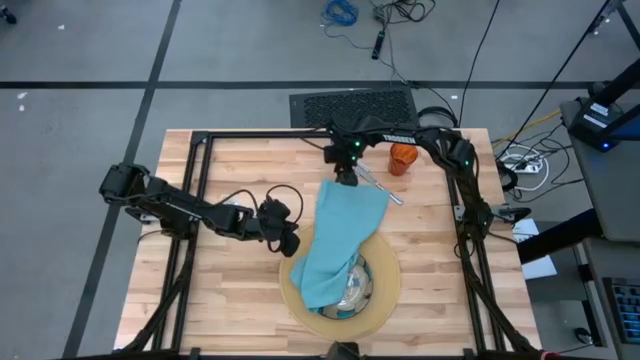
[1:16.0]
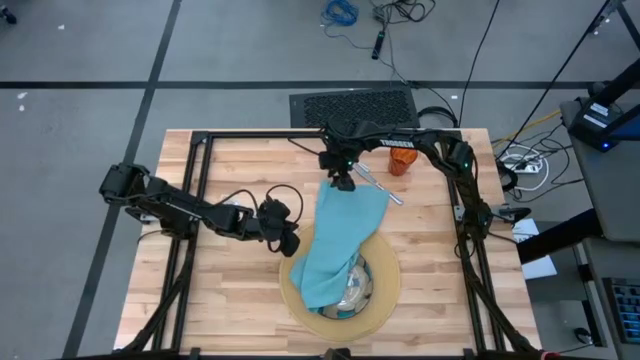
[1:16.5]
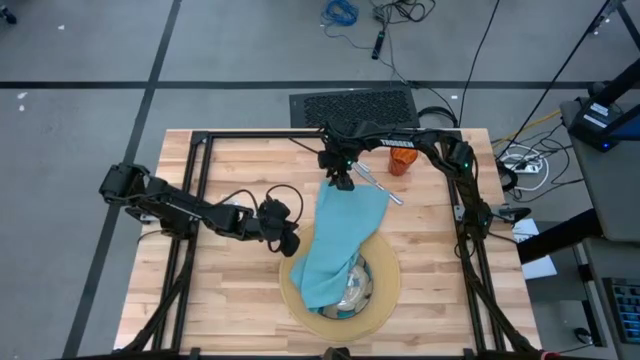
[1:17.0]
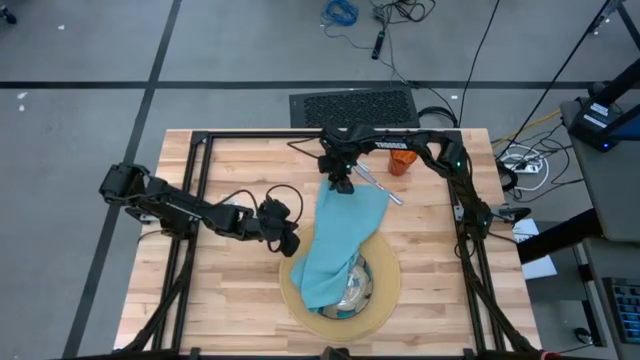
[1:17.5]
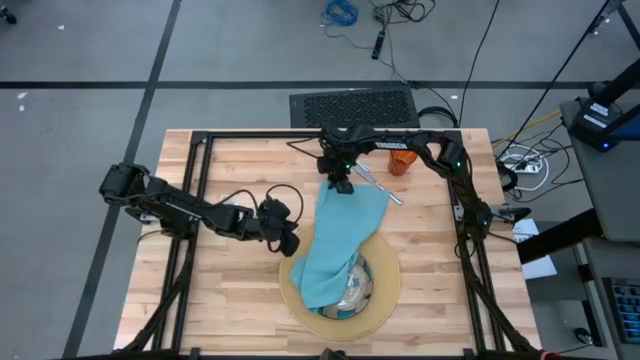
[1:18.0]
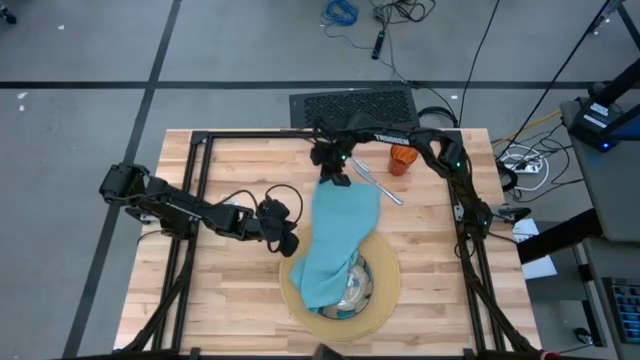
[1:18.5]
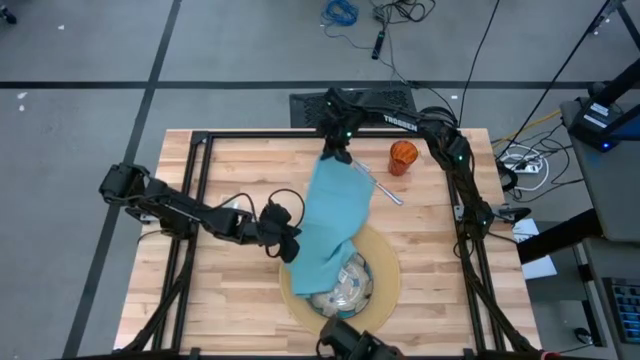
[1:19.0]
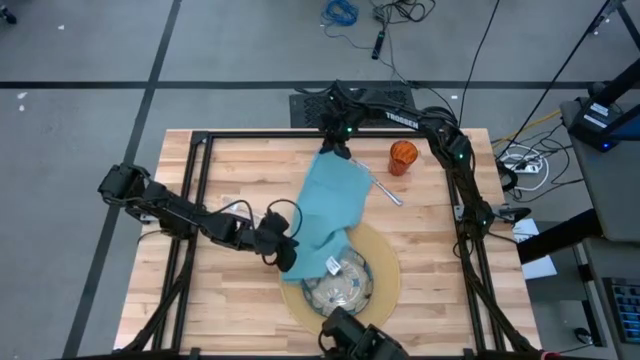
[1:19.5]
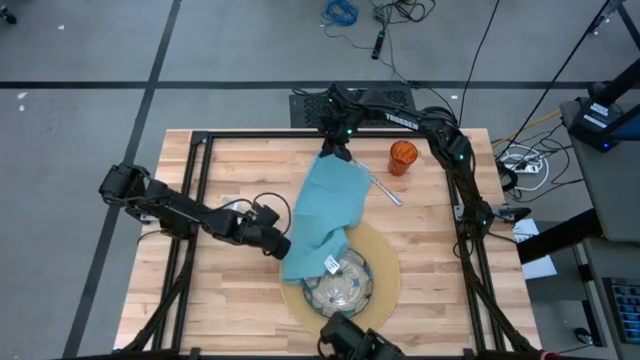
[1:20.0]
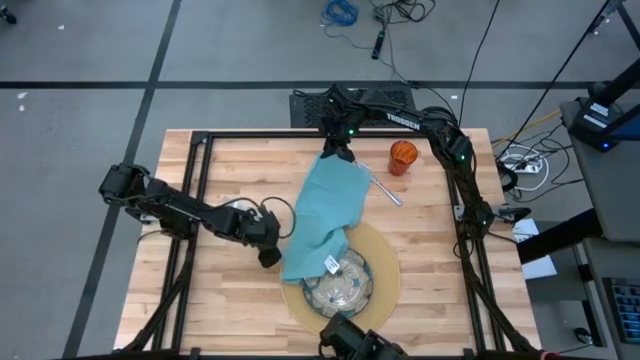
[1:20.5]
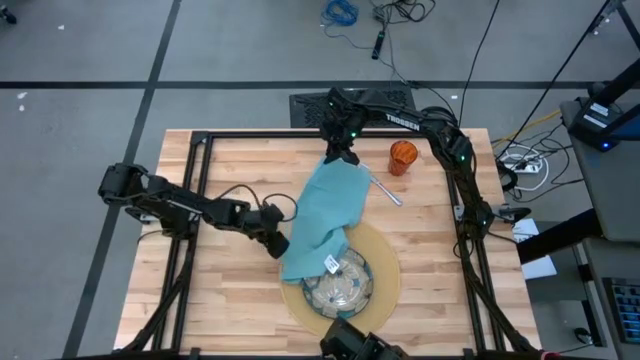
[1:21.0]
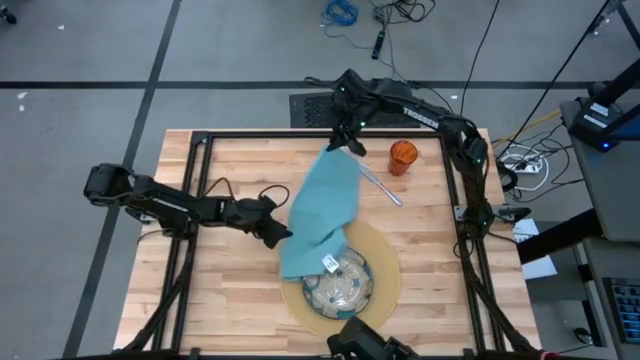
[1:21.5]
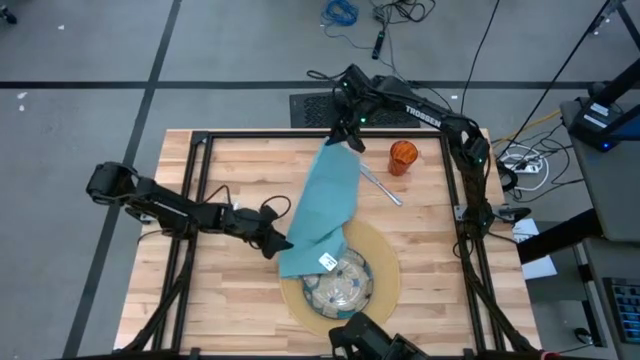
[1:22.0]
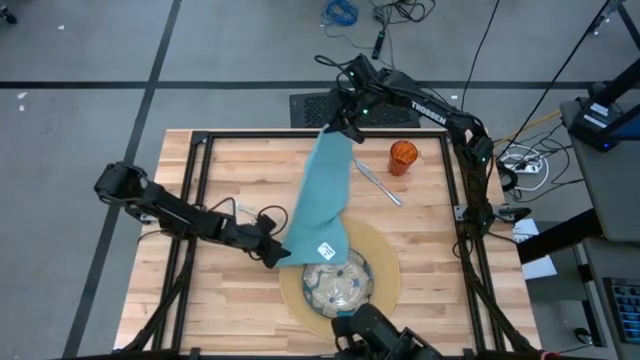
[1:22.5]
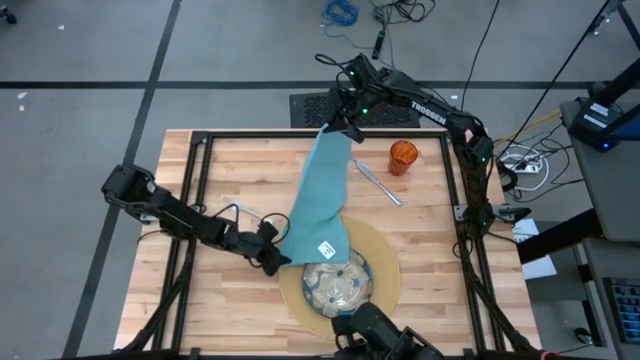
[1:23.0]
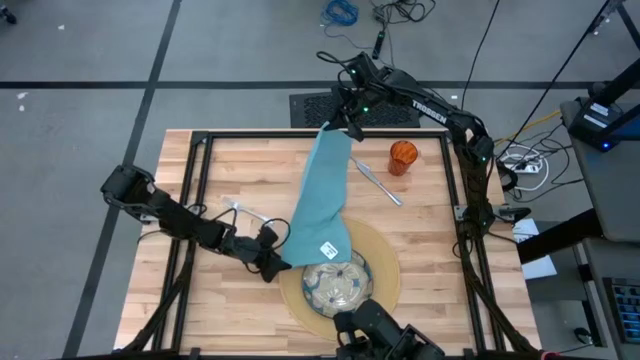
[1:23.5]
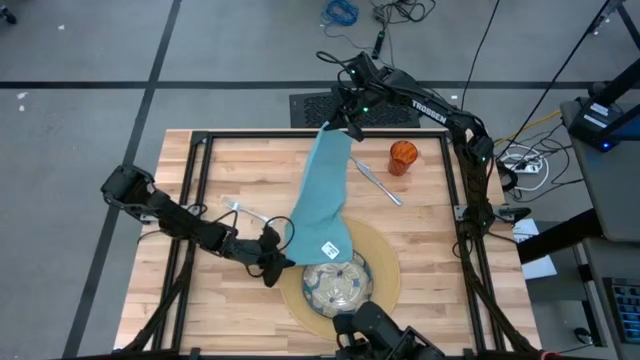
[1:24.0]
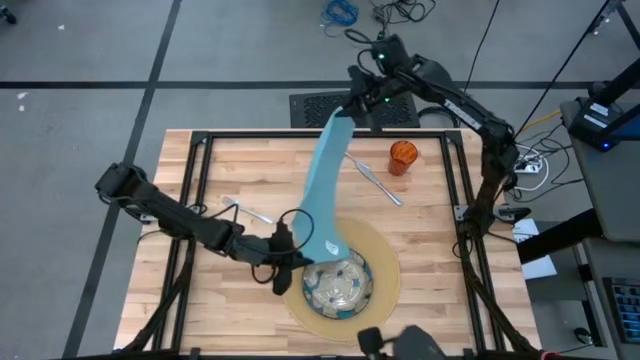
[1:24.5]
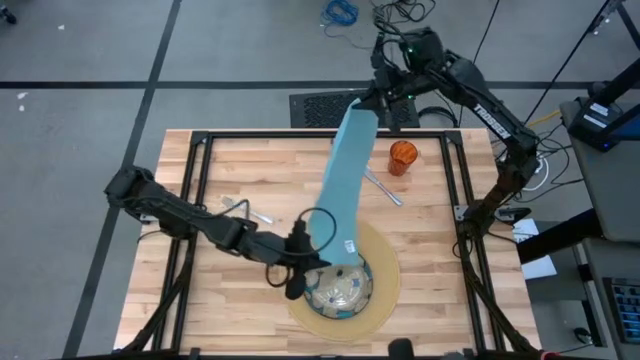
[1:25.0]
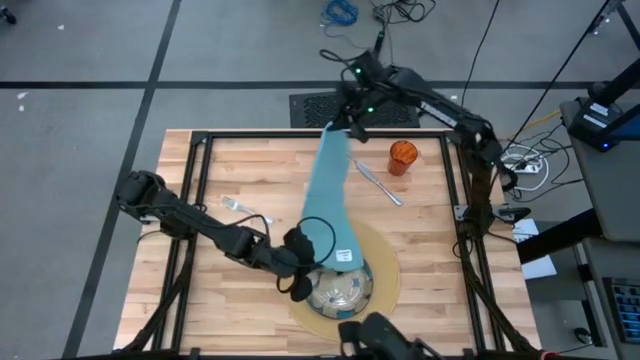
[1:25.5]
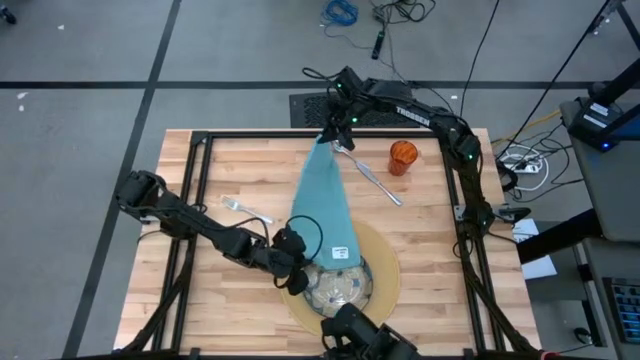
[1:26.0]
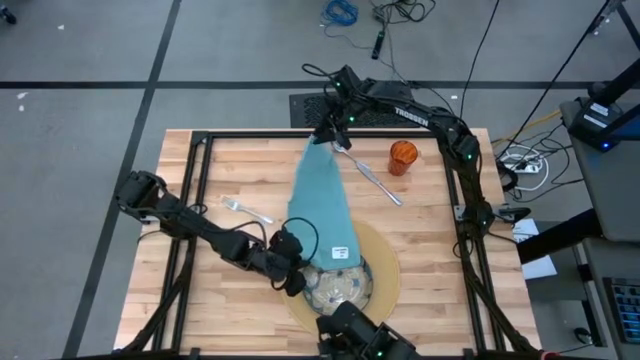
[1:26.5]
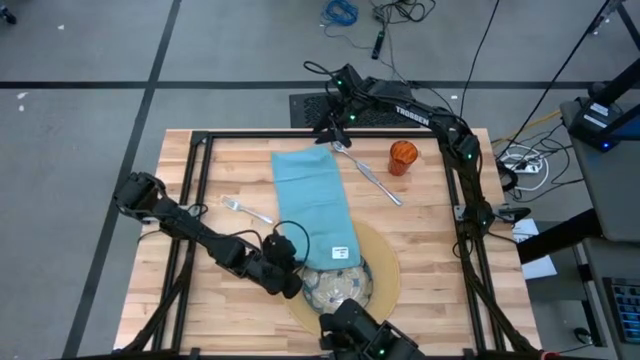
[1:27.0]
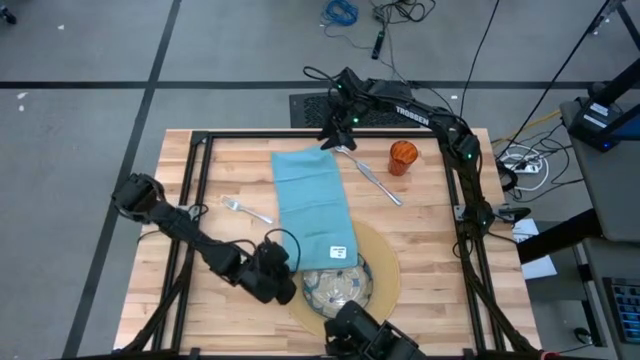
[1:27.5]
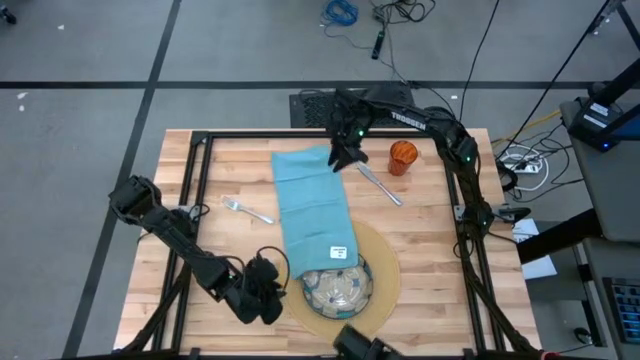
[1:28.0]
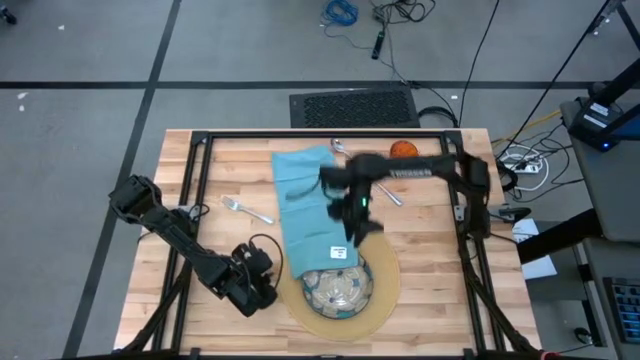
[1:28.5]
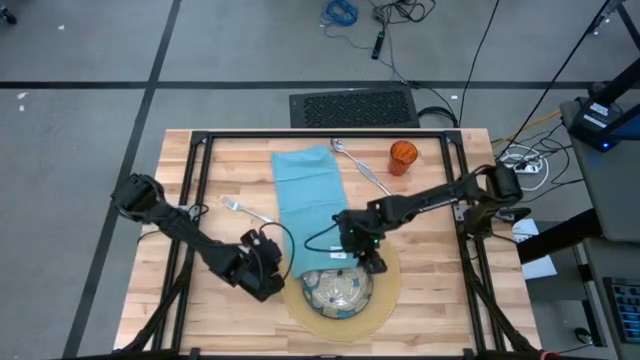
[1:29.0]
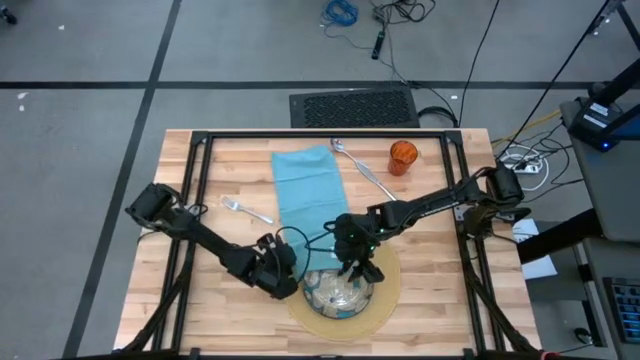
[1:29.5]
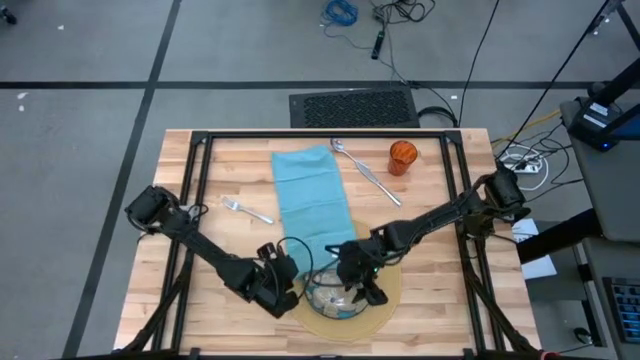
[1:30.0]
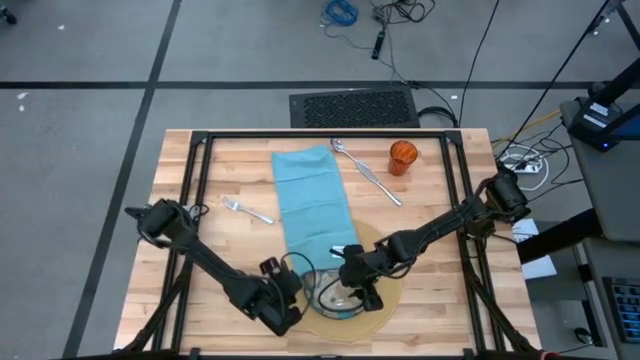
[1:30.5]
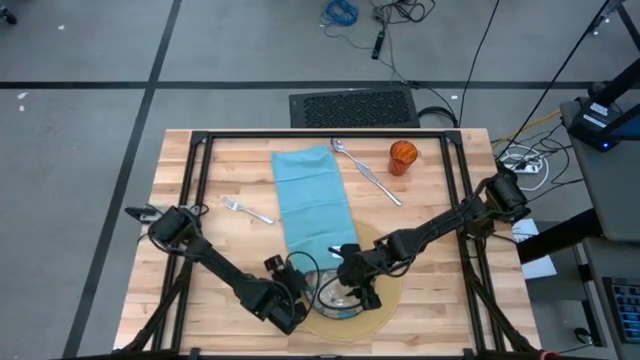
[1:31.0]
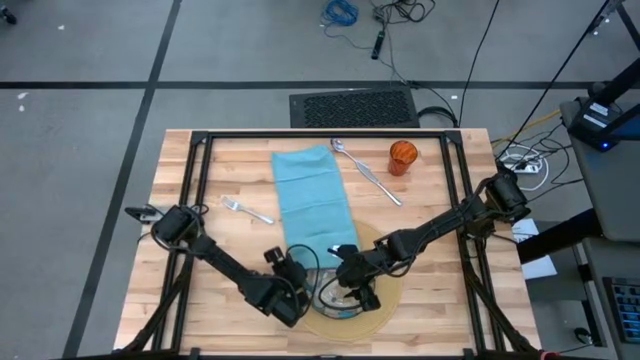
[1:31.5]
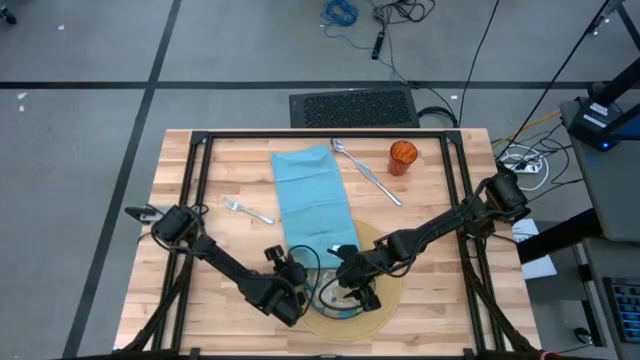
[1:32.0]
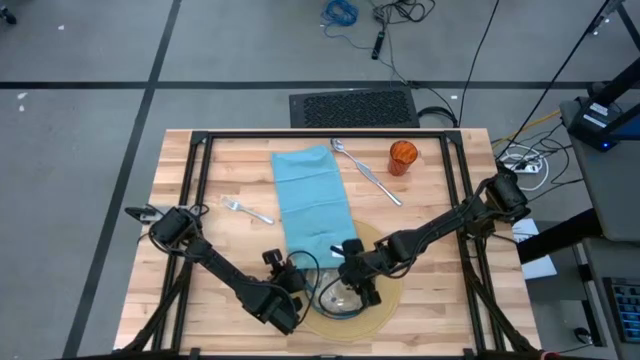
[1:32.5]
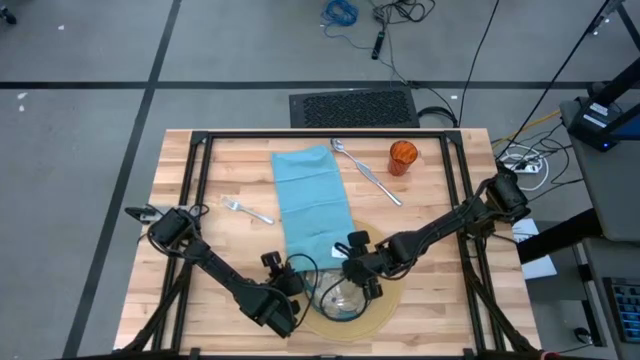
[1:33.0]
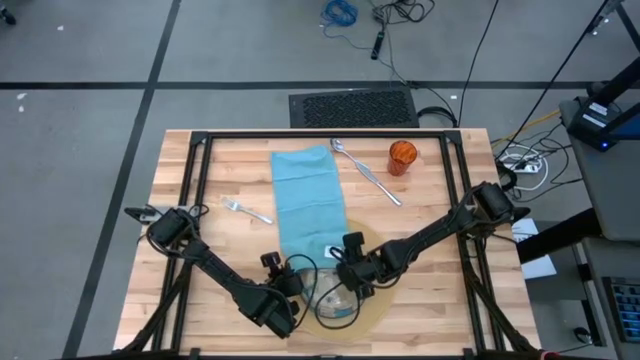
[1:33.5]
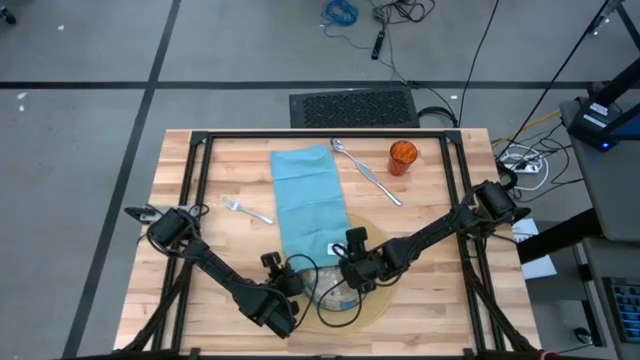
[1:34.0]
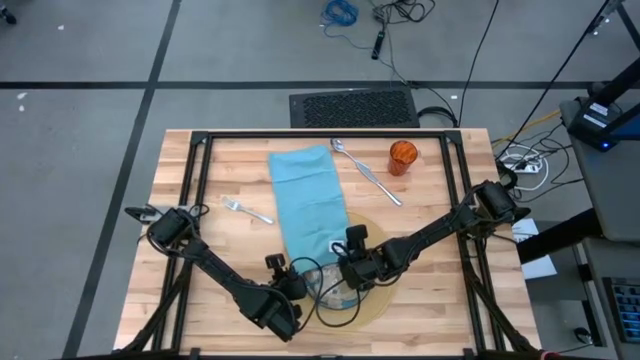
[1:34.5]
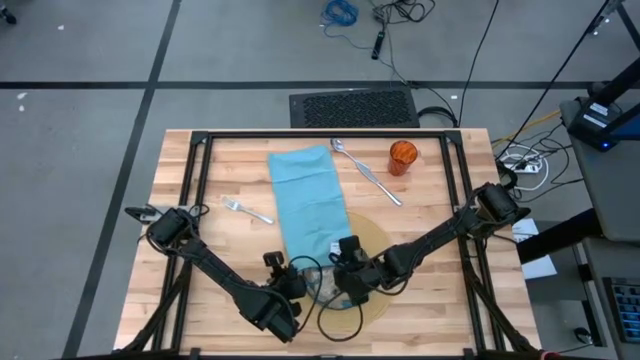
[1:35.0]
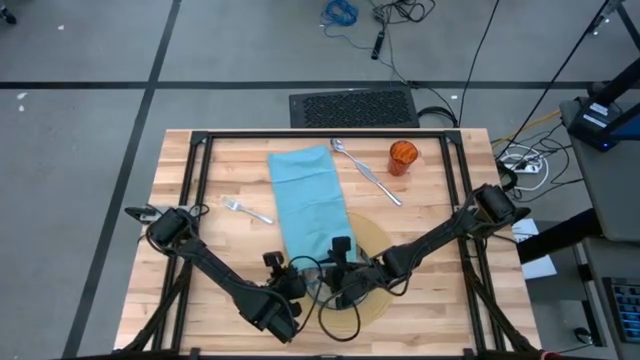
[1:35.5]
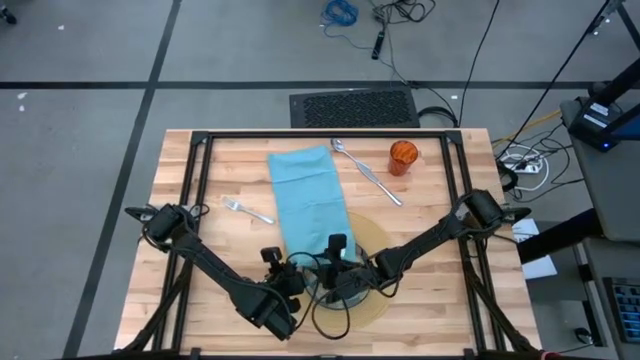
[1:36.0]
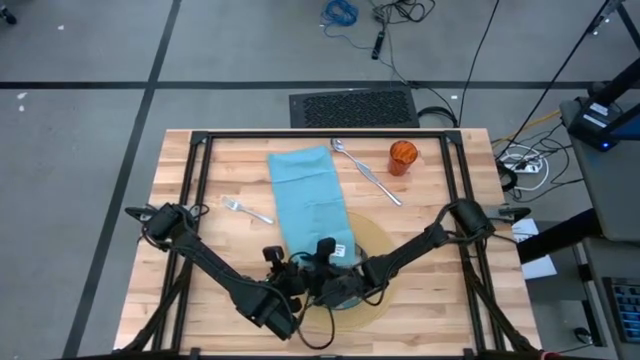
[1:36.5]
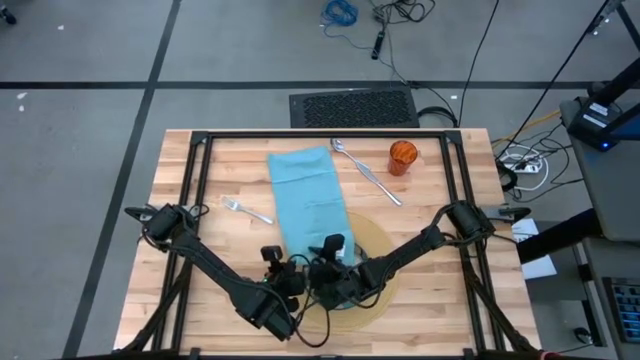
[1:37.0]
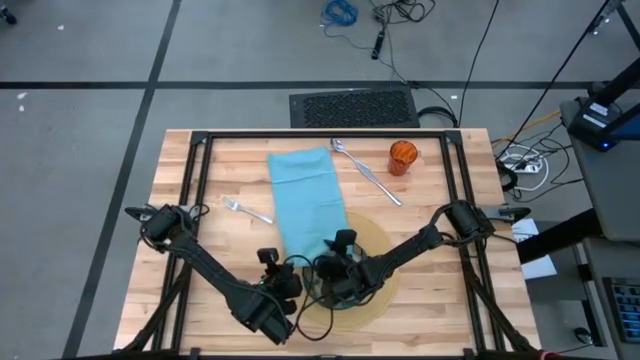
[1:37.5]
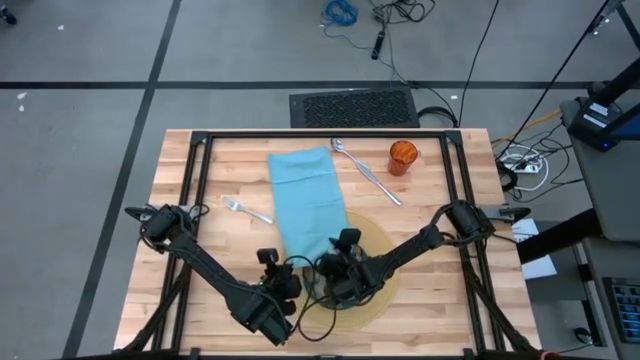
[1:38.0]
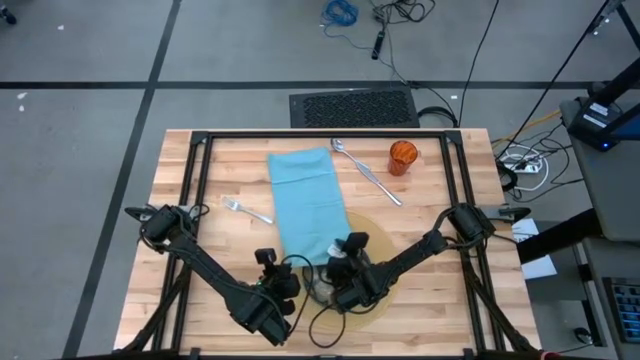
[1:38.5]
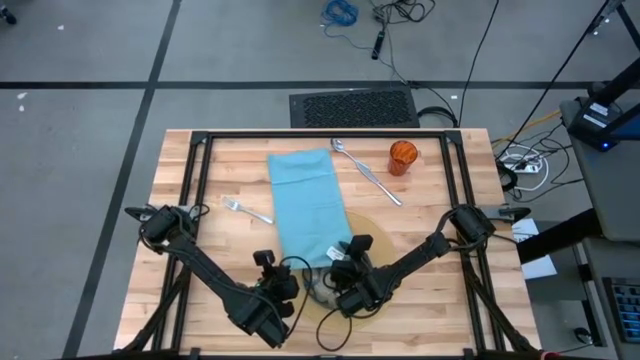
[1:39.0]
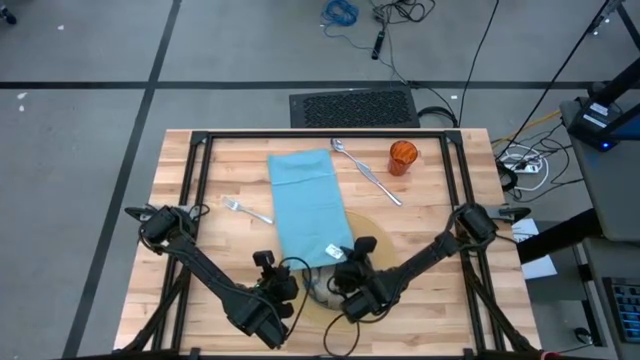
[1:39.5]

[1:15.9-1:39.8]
Task: Set table place
Fold the blue napkin
